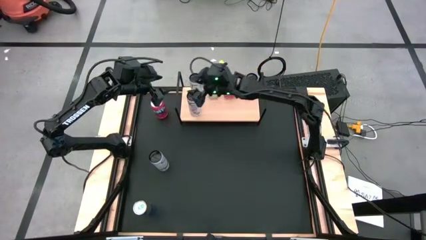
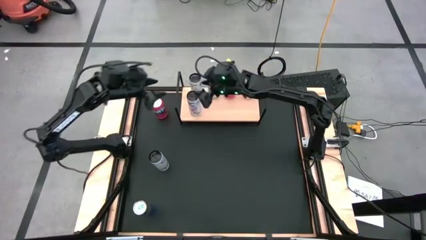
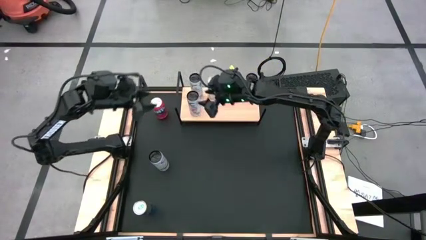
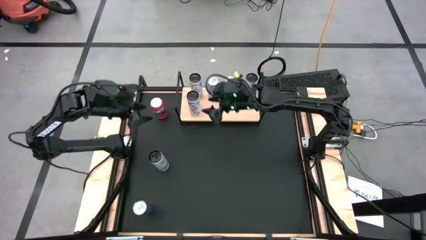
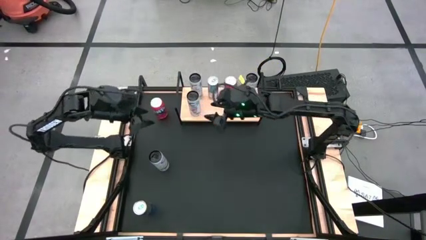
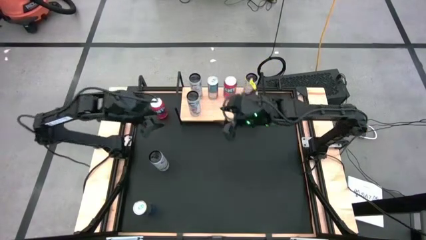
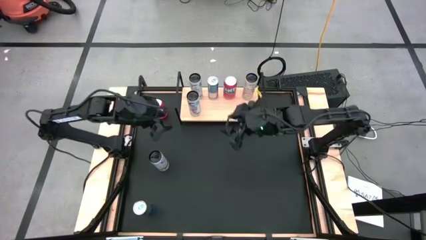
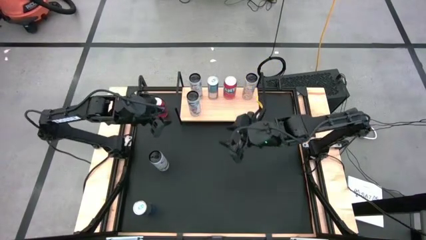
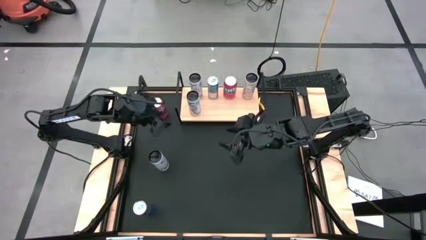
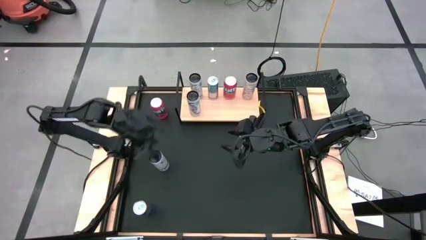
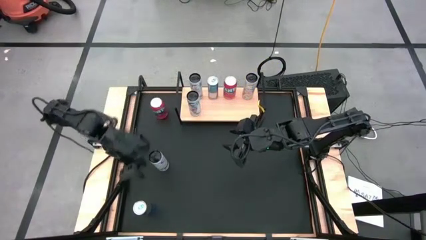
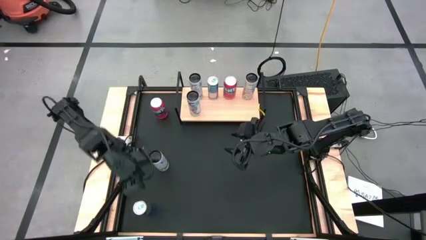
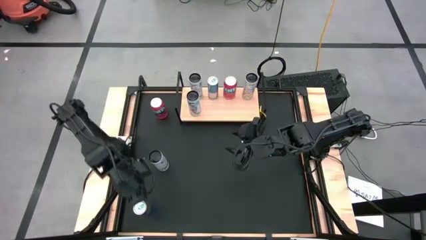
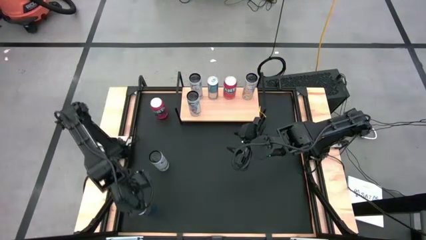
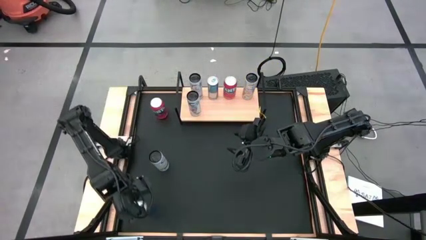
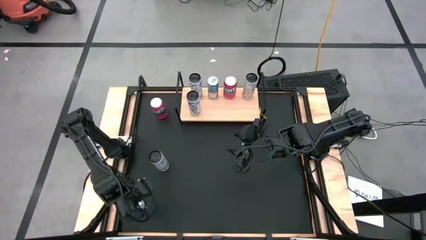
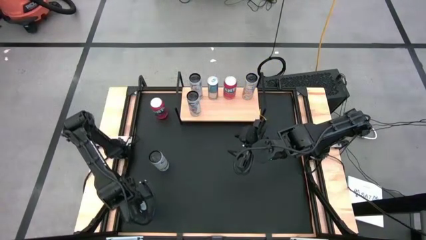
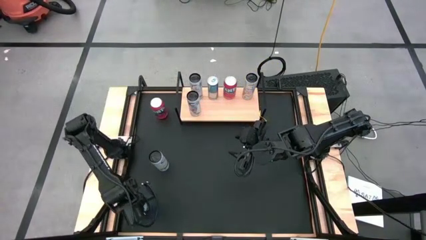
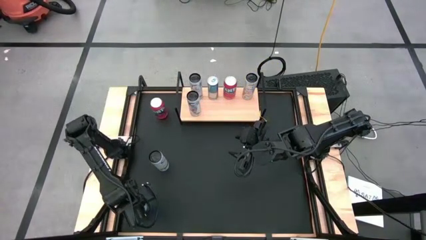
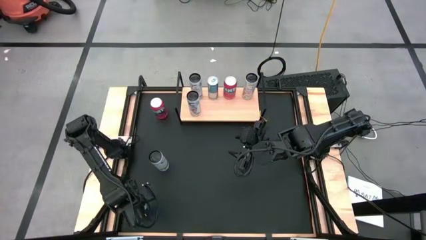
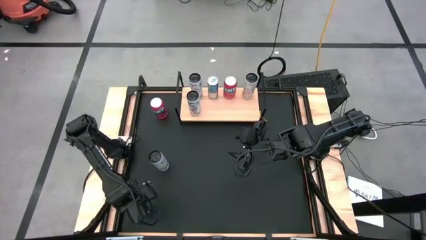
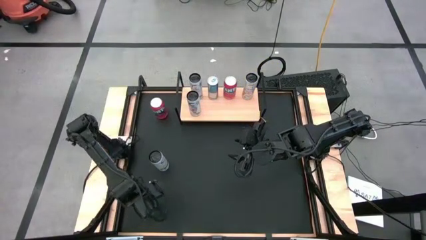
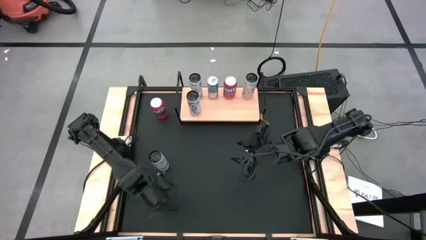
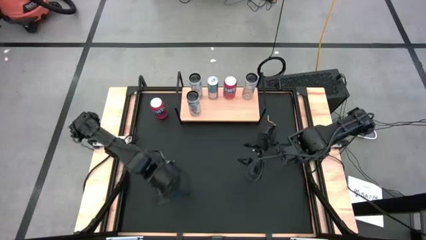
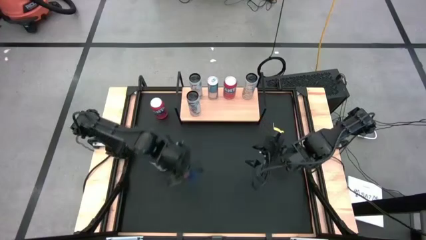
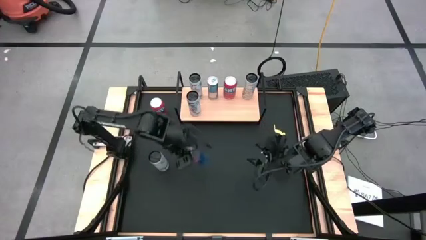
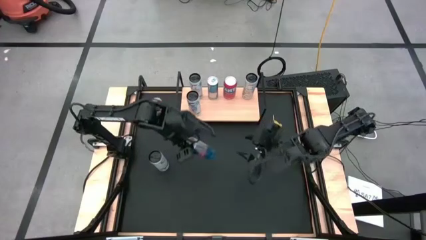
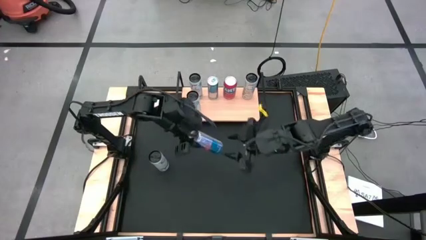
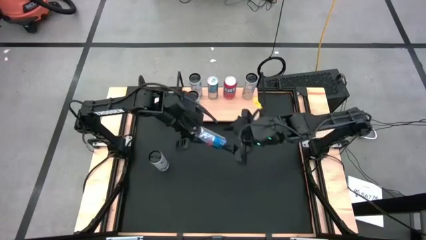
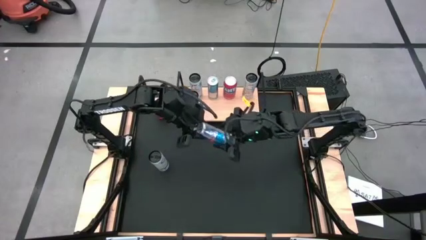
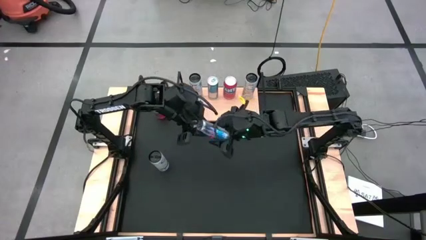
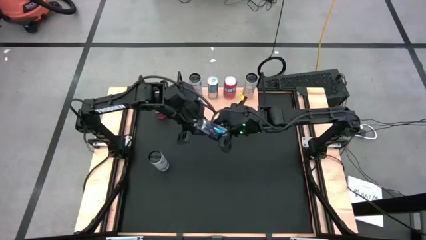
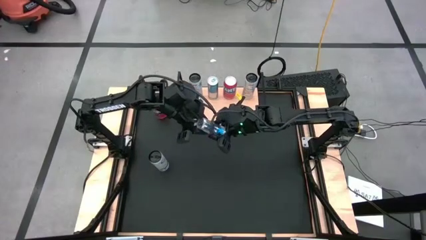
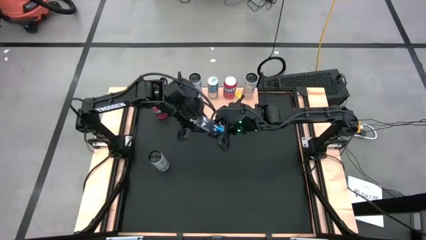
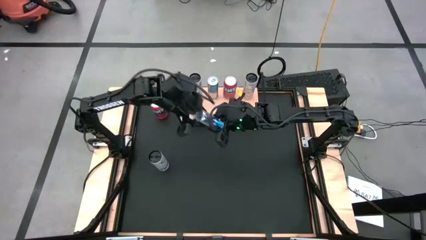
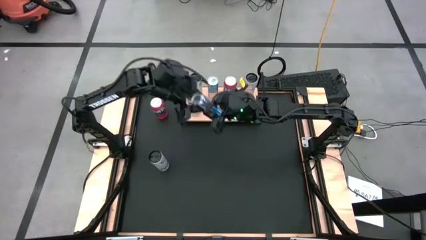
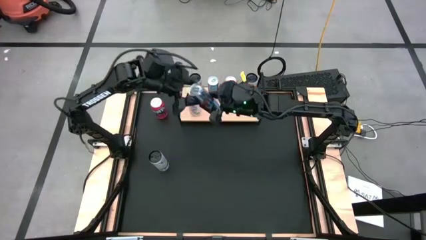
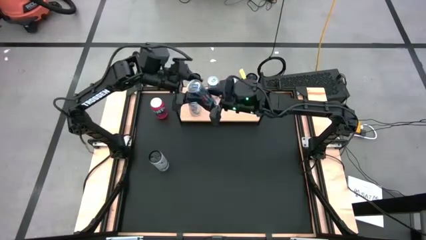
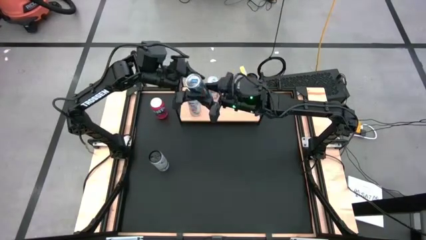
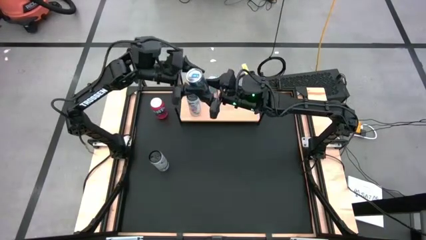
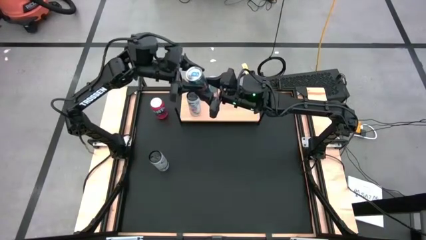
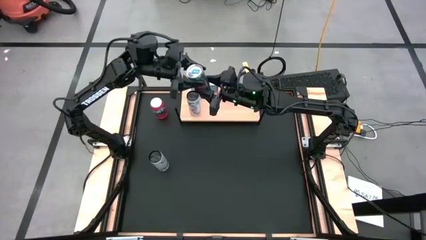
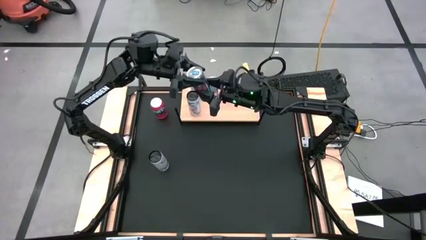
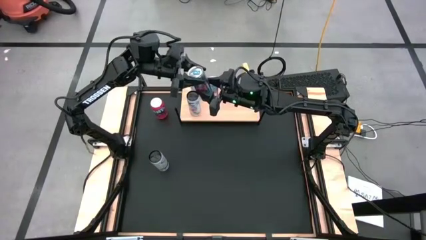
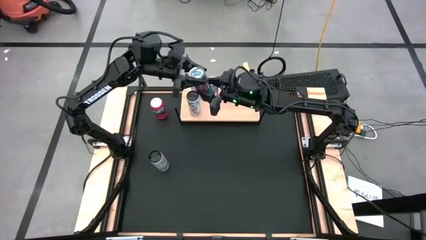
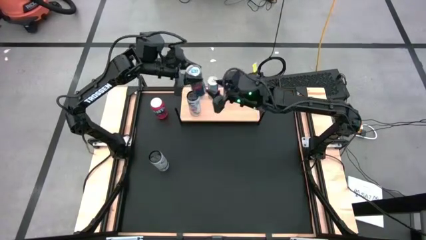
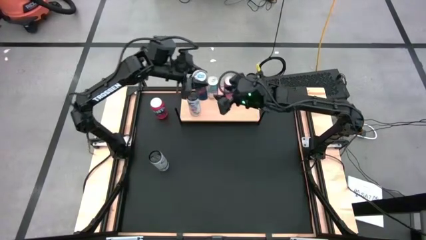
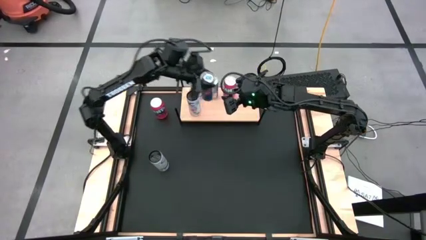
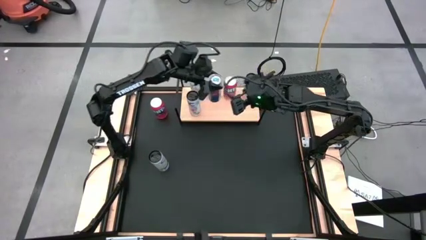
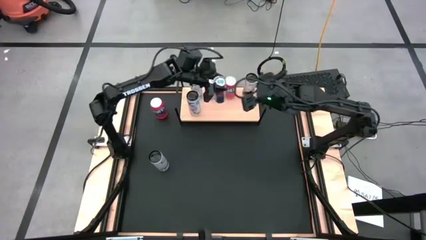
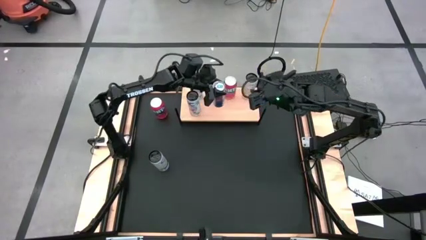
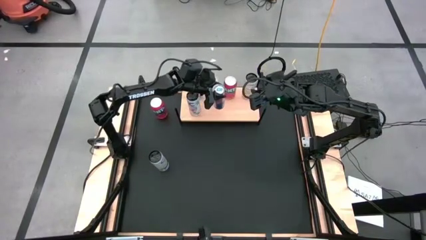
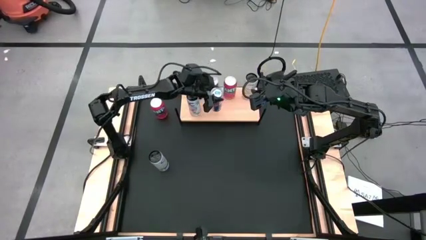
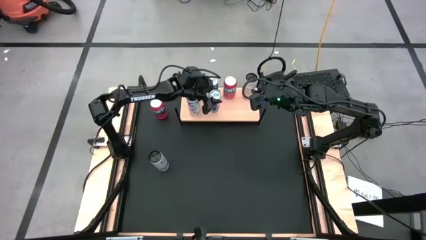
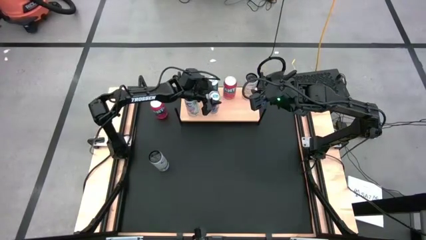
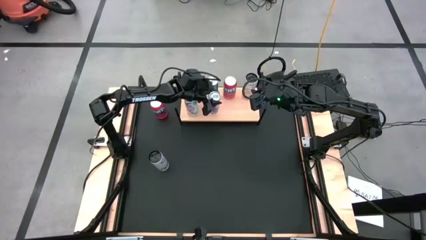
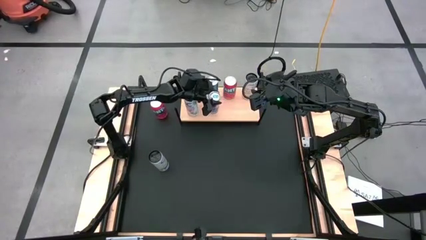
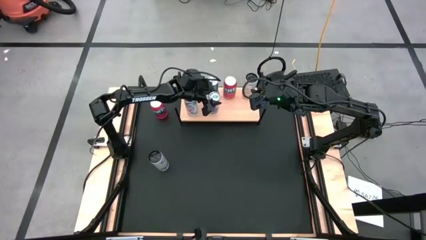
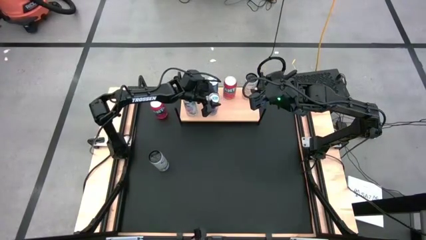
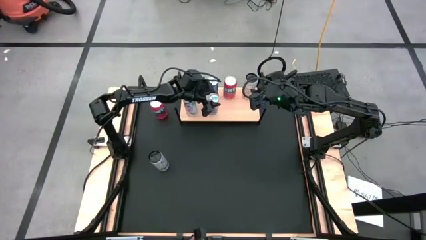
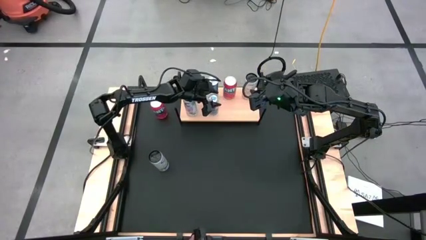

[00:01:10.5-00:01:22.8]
Task: Place canned beverage on shelf
Put the blue soda can on the shelf aligned with the other blue soda can

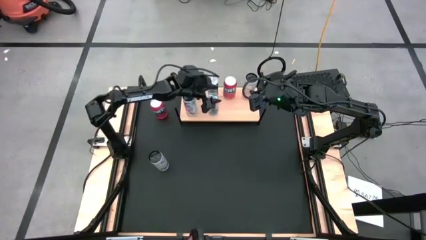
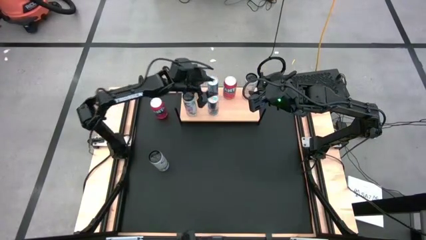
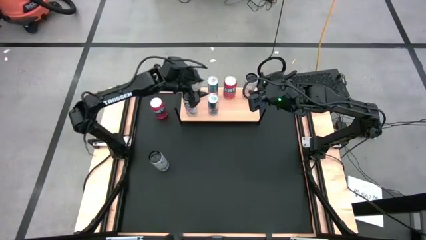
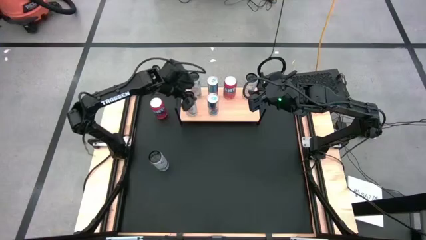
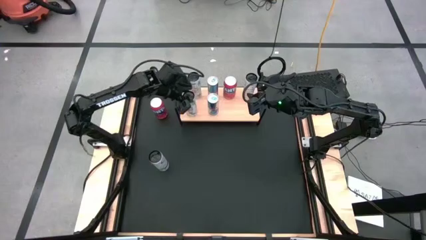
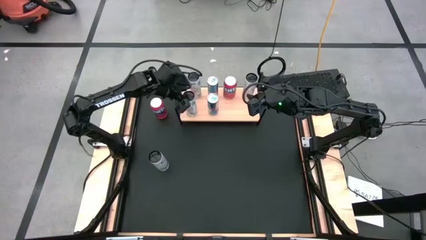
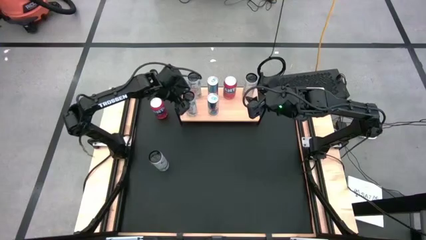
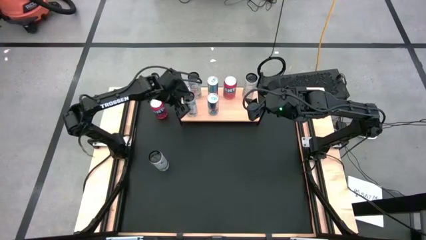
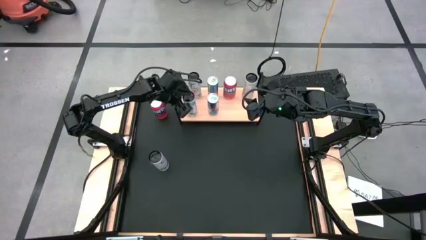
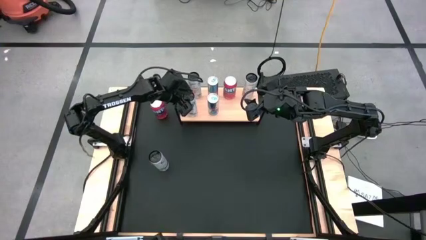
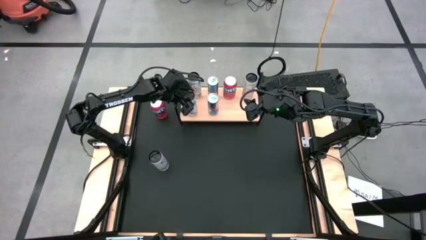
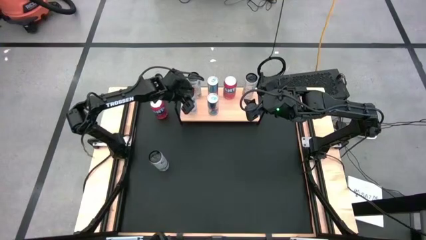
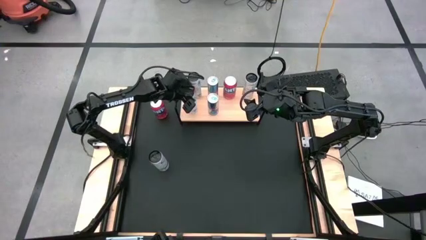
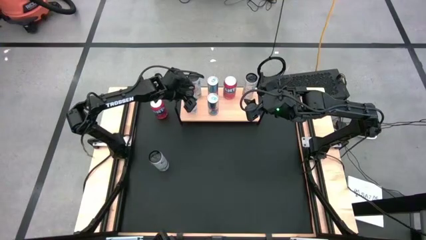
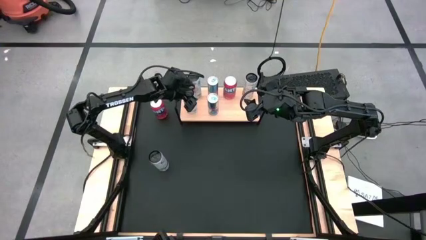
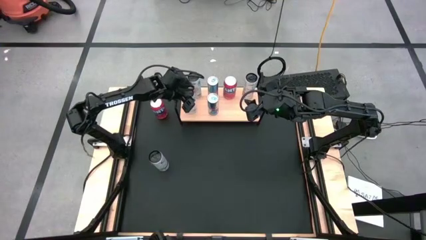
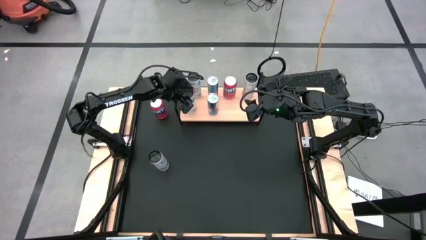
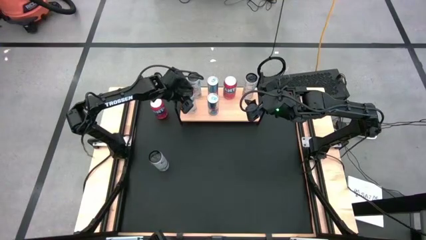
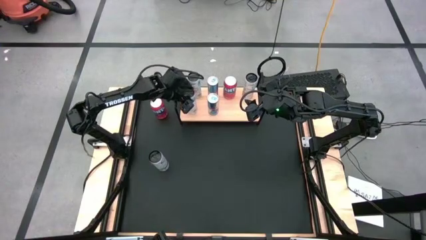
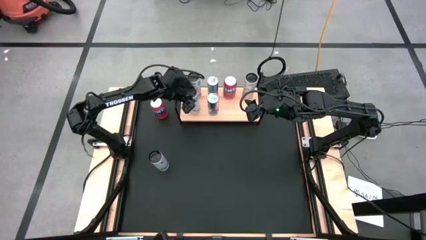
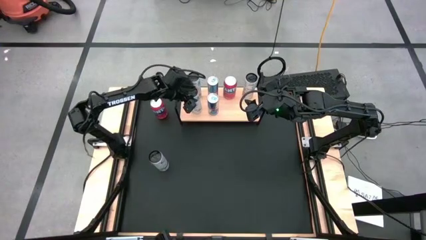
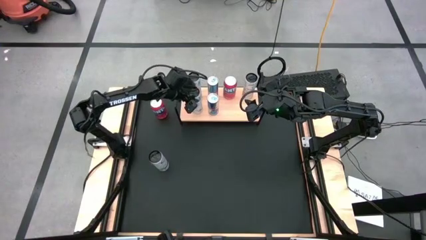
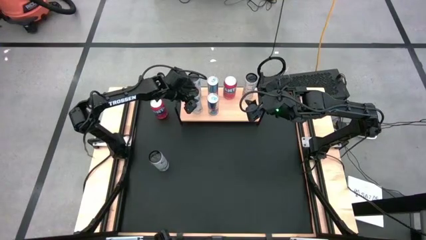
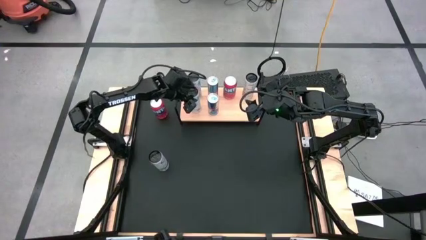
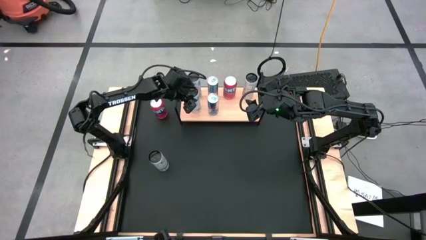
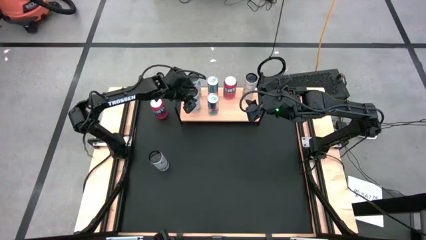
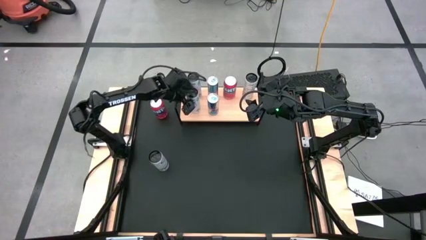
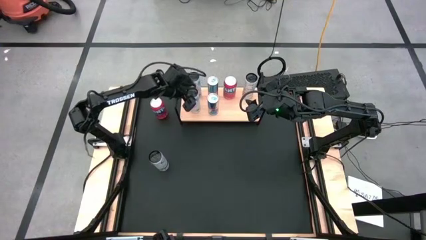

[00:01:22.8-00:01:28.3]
Adjust the white-pink soda can on the shelf
